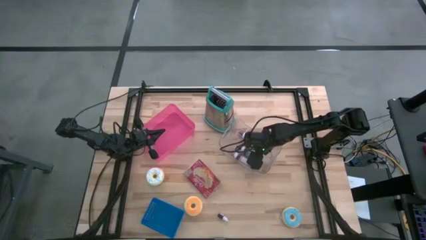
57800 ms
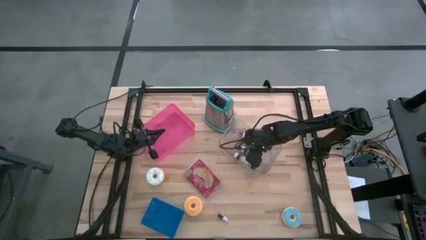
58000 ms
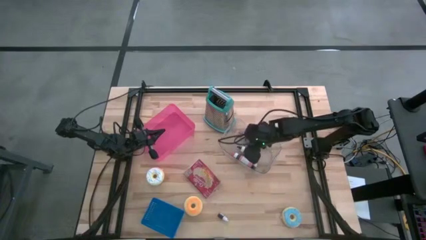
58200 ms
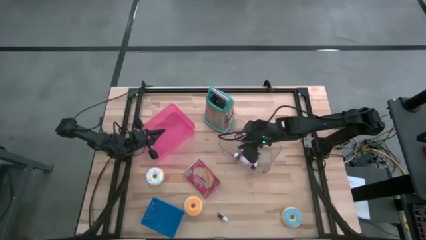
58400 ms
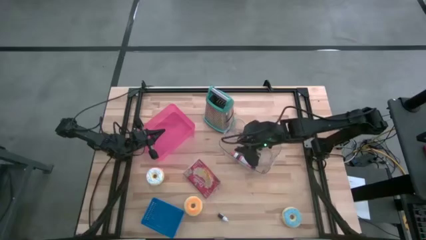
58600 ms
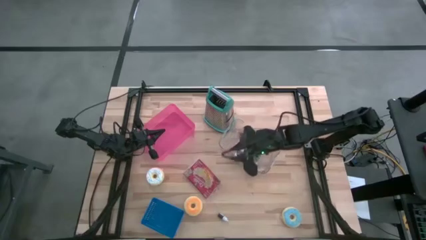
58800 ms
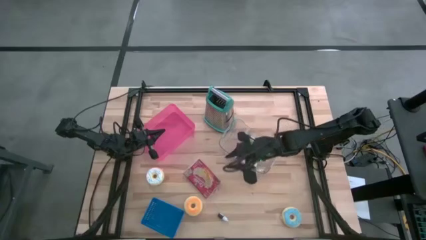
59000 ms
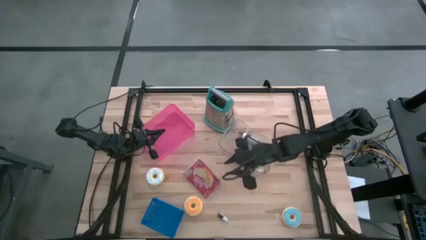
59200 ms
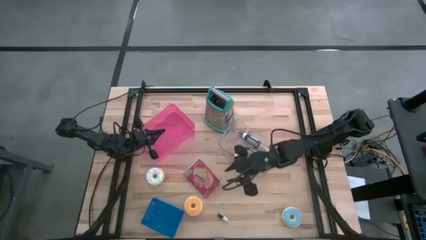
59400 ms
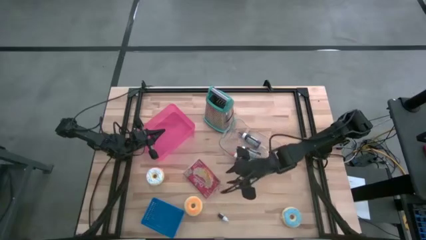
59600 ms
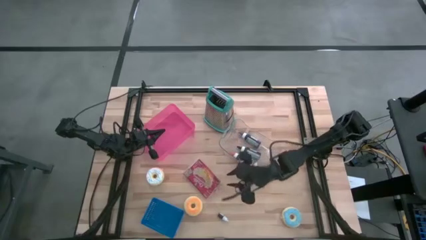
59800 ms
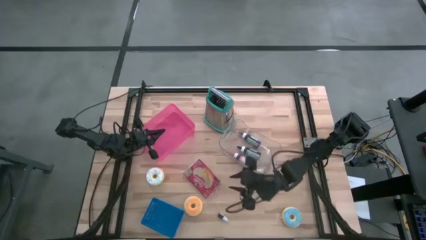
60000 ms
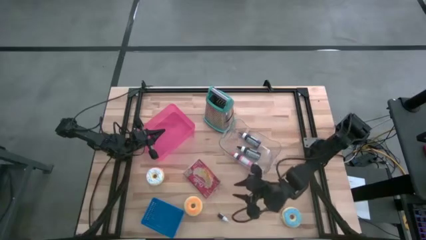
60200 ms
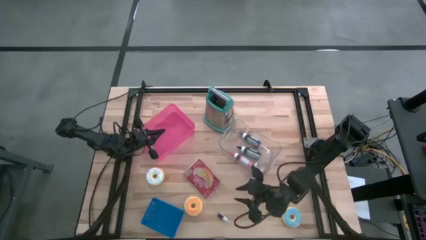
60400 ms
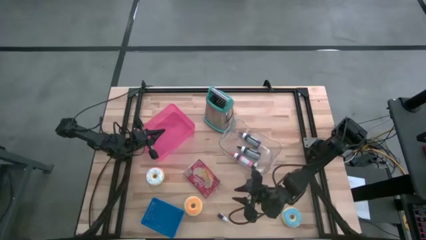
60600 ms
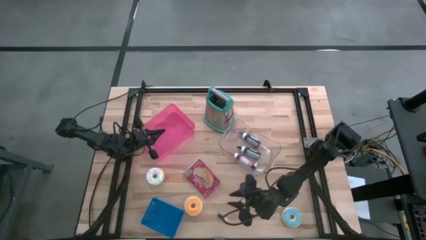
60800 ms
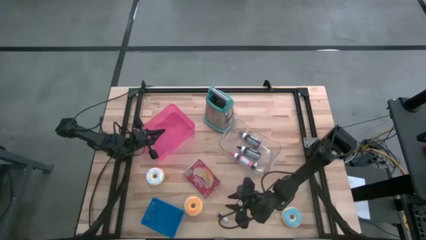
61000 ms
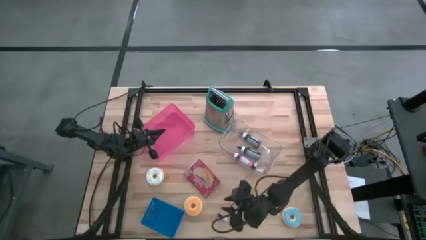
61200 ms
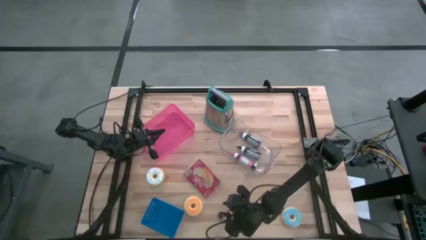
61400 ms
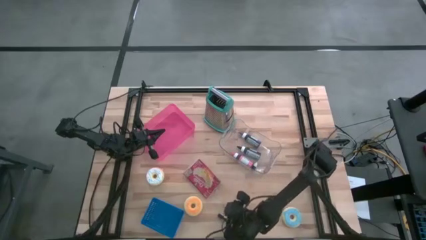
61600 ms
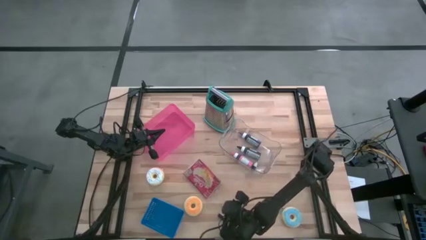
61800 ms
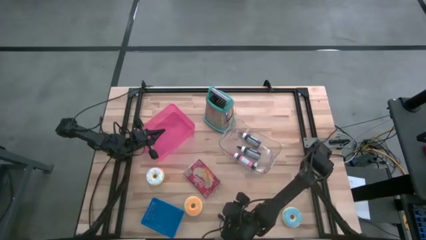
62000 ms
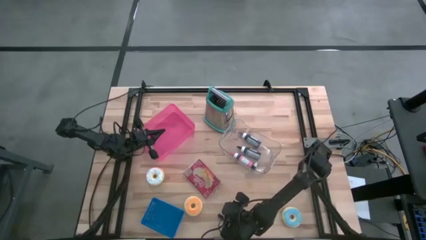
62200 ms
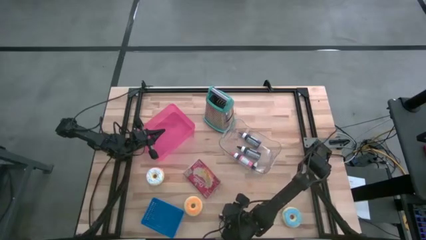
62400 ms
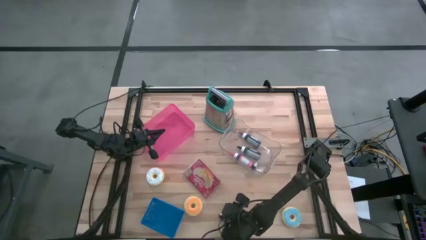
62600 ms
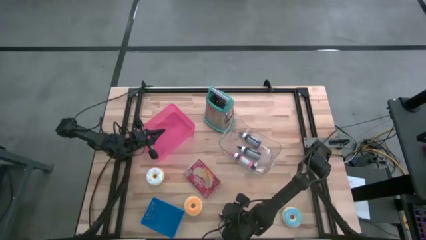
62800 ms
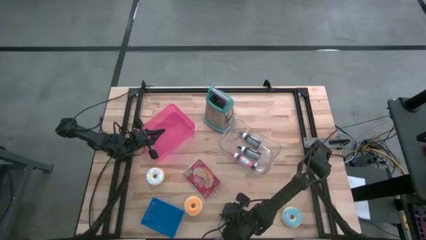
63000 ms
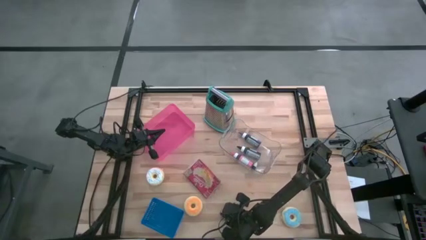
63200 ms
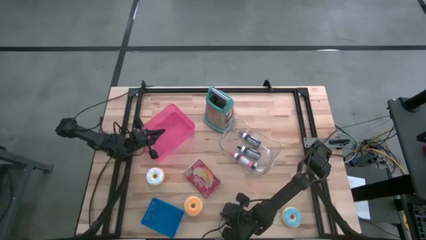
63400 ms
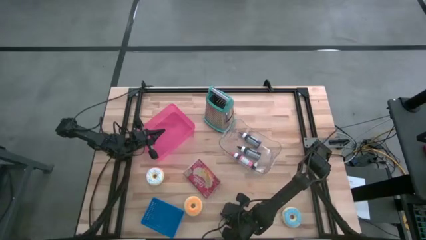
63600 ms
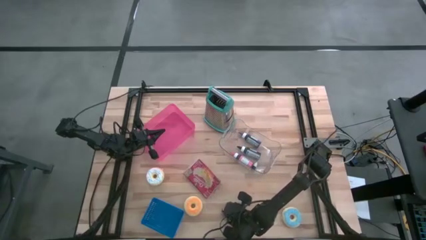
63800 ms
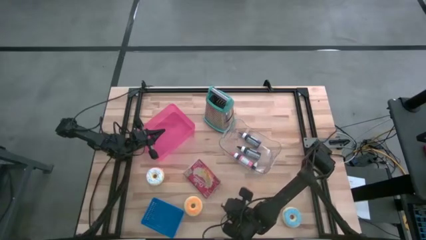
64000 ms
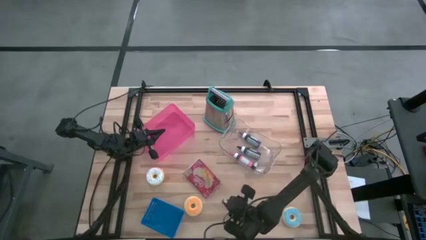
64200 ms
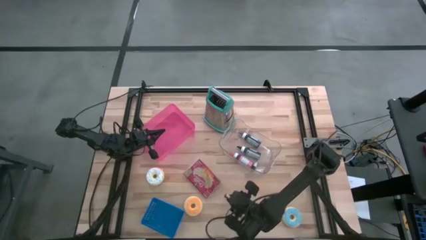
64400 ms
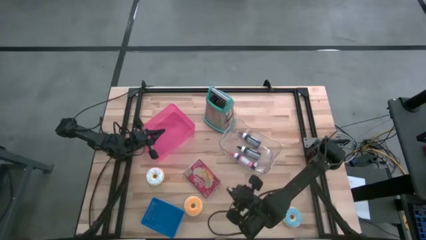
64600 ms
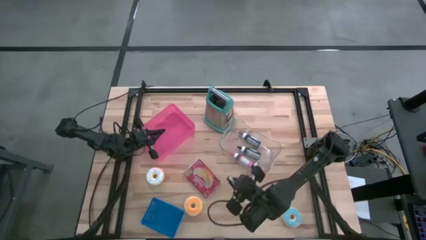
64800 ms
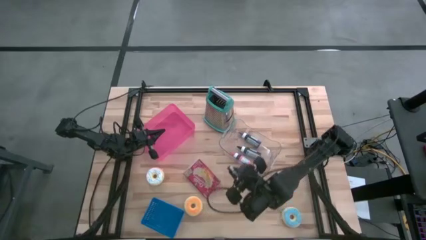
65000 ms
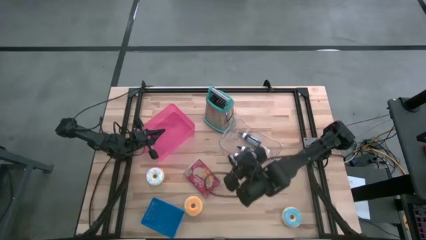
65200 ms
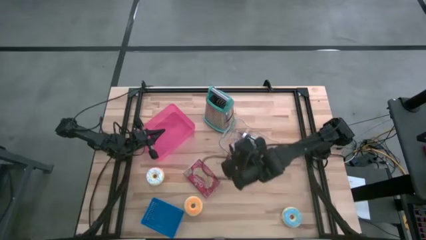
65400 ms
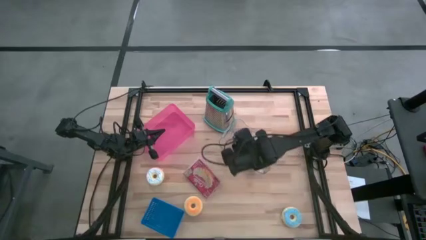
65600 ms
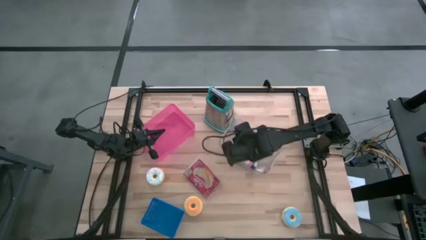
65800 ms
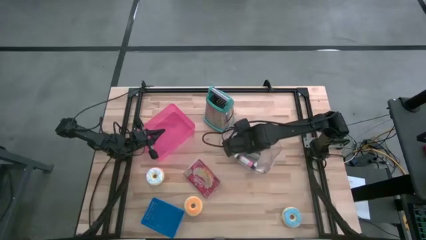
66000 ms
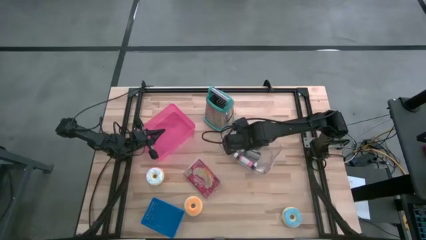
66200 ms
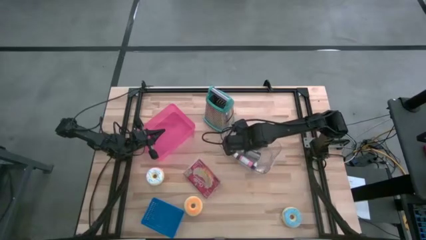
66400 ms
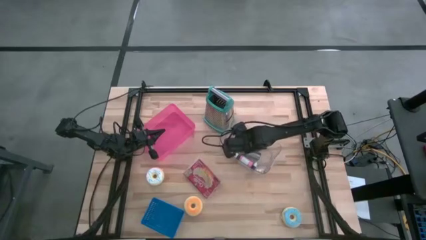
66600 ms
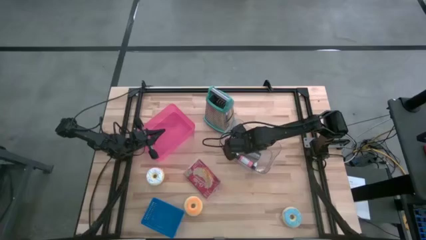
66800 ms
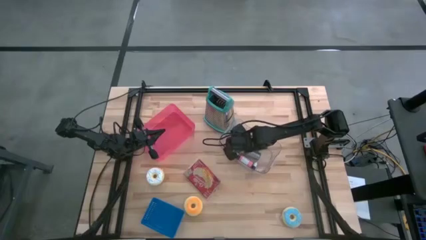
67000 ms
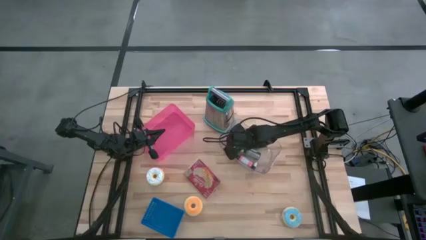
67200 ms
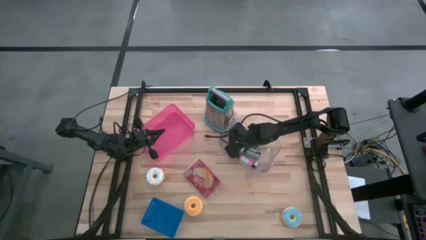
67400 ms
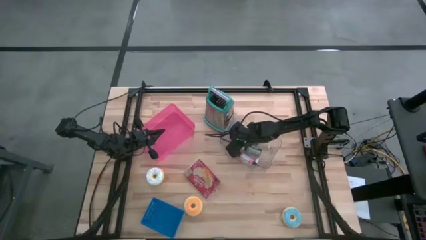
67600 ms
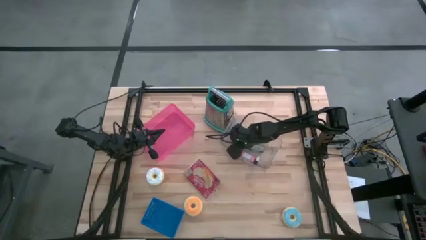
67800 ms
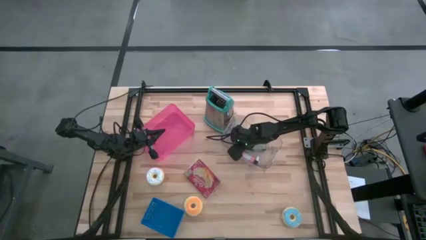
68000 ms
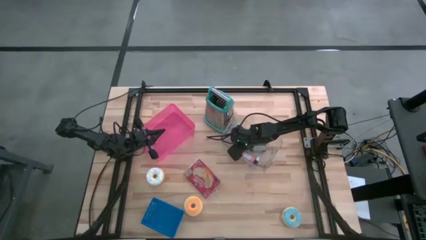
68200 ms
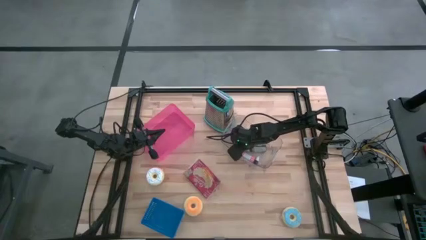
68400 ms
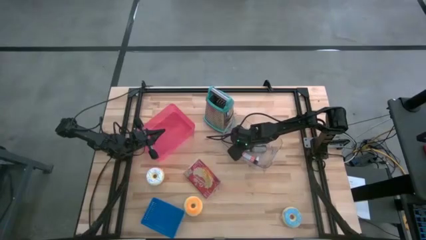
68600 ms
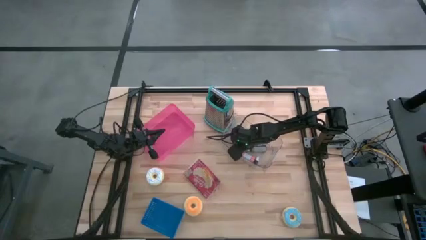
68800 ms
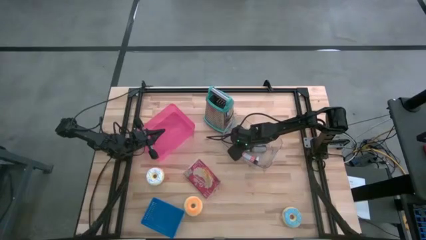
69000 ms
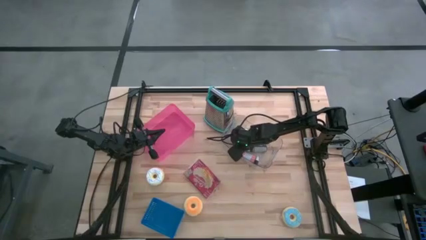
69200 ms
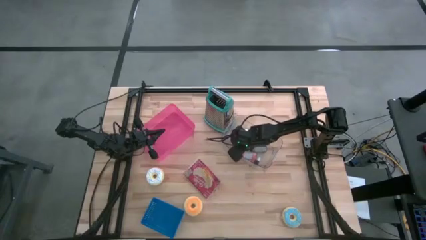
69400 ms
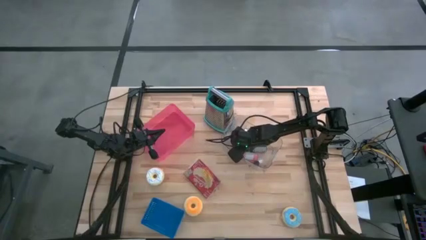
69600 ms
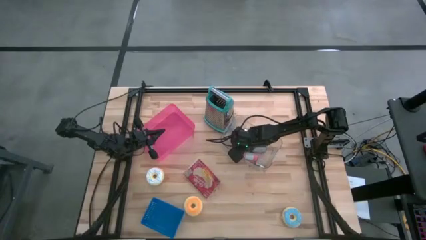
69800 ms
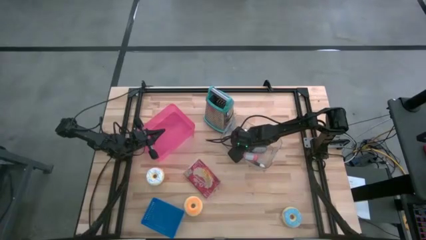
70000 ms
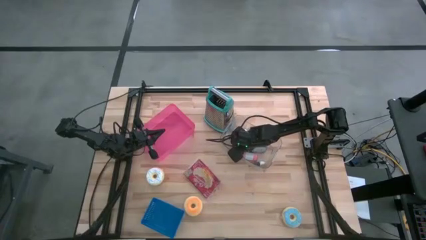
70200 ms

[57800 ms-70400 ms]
Task: Pick & Place Food Item
Put the small red food coloring bottle into the transparent bin

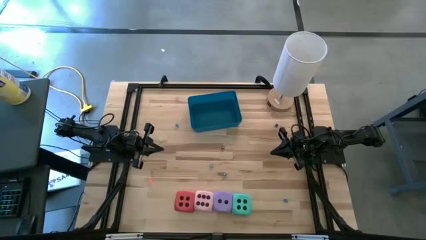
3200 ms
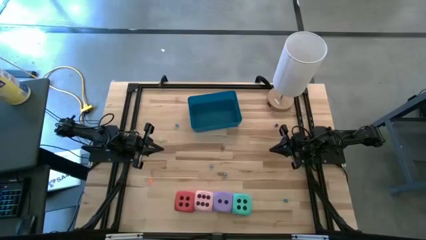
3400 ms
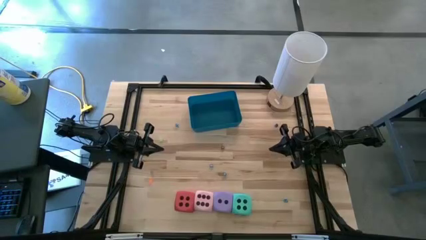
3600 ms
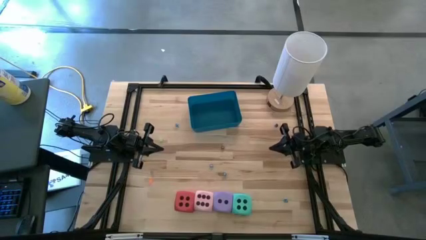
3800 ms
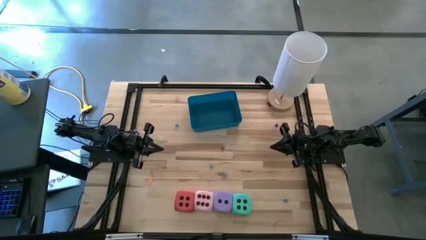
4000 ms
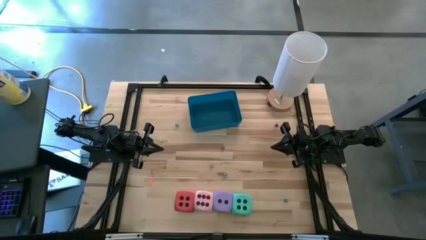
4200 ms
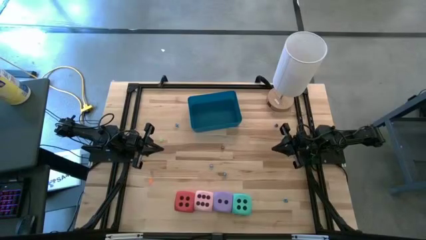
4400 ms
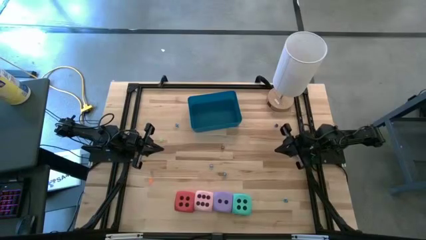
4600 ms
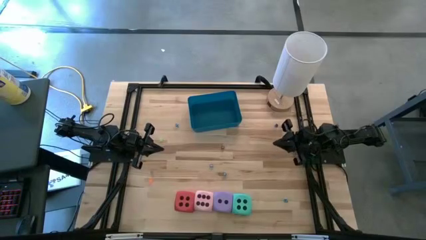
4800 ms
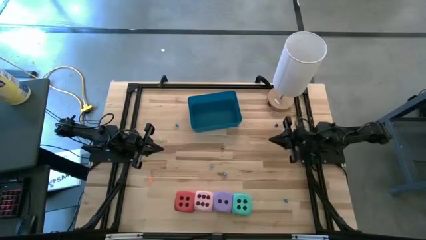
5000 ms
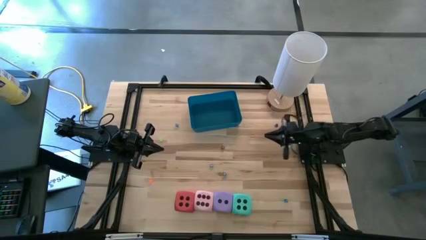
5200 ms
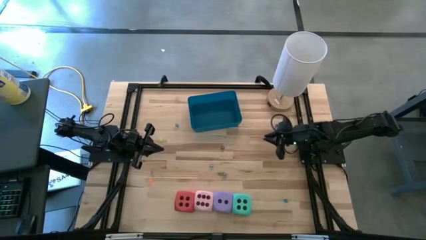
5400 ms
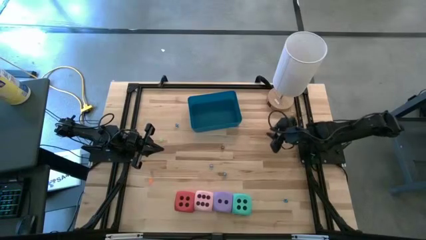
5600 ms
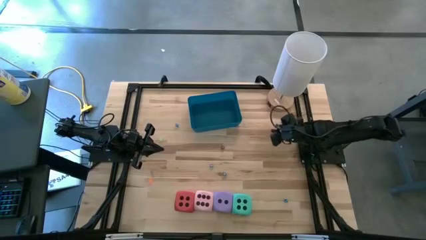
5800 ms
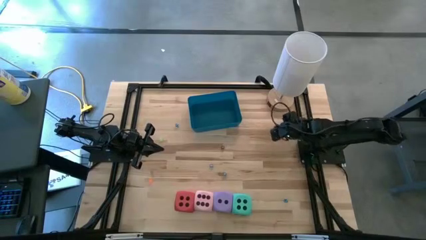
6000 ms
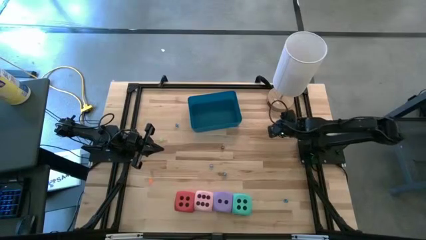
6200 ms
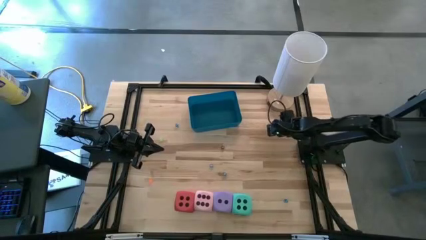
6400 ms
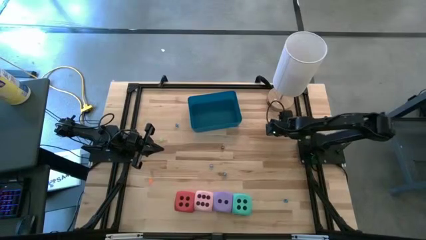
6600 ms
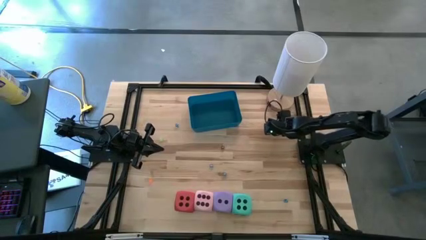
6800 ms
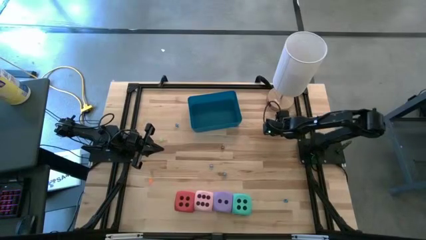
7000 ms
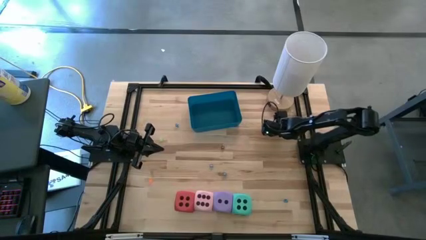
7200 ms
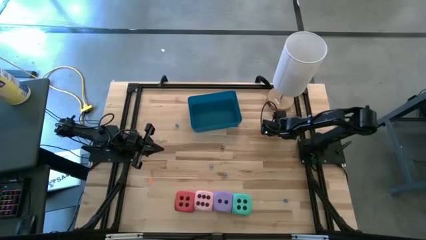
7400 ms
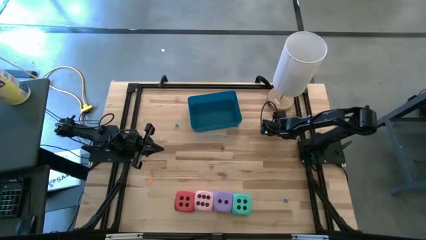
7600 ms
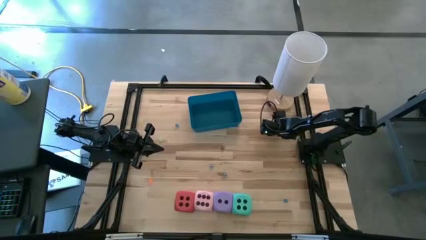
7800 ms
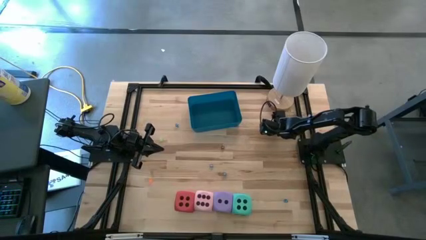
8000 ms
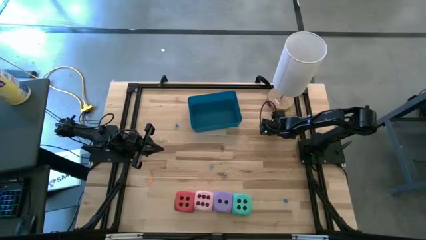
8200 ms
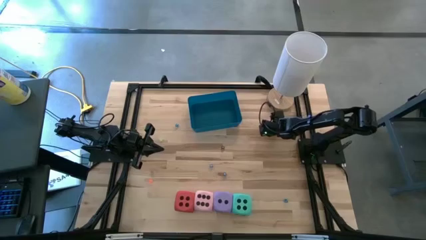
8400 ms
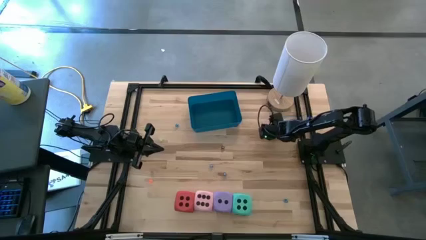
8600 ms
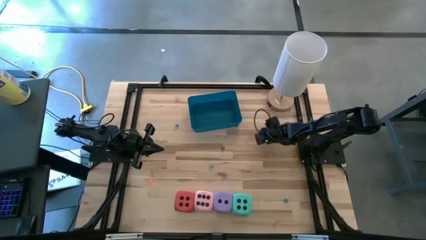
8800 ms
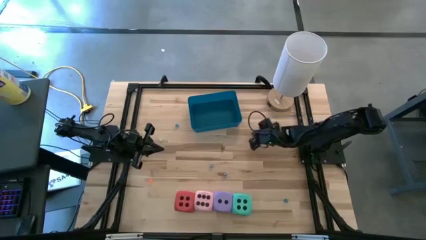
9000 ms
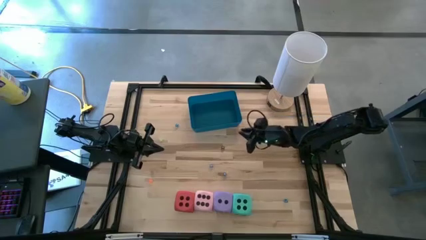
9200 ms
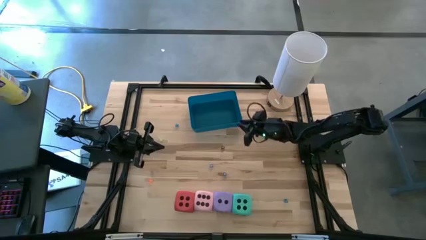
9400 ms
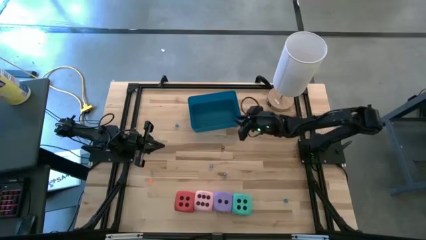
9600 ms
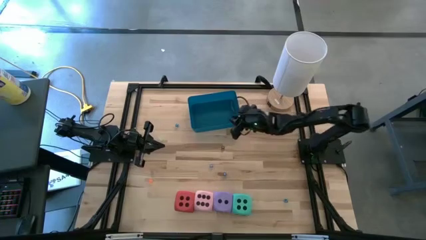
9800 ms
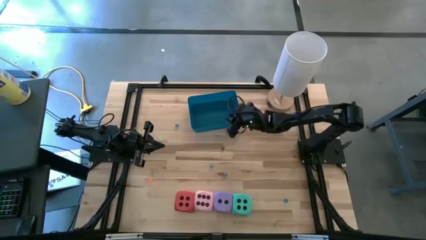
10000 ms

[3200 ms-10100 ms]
Task: Pick & Place Dice
Put the small blue dice into the blue bin
